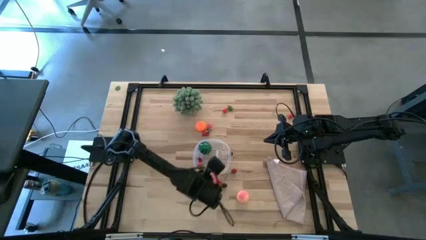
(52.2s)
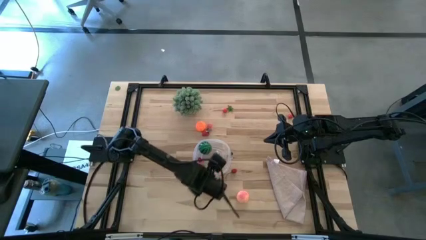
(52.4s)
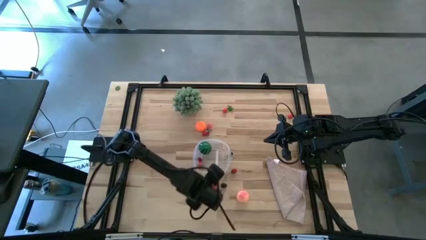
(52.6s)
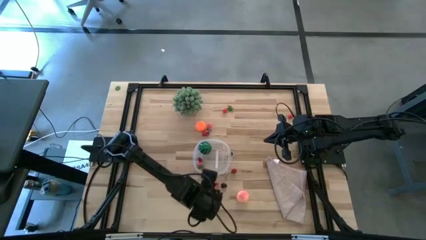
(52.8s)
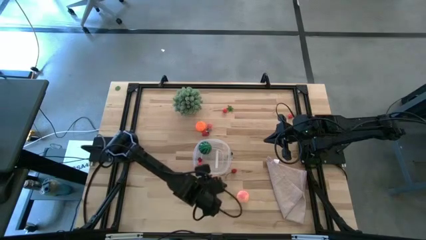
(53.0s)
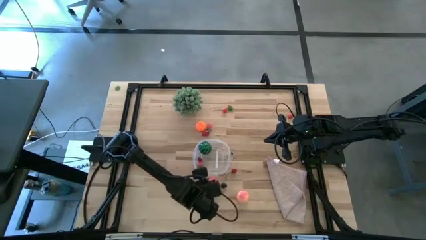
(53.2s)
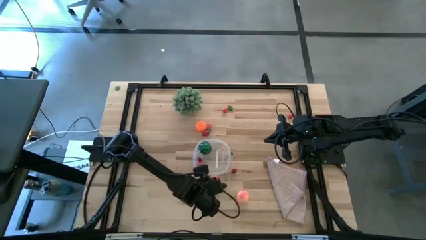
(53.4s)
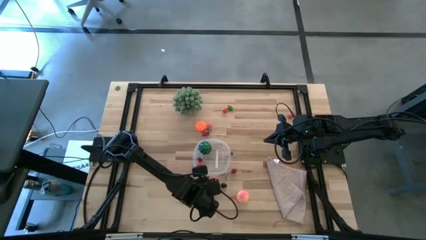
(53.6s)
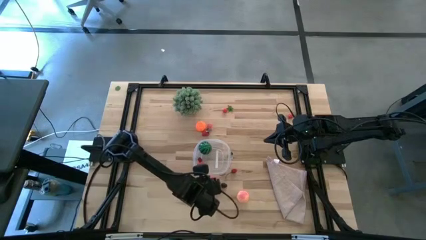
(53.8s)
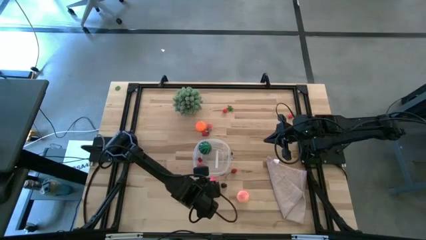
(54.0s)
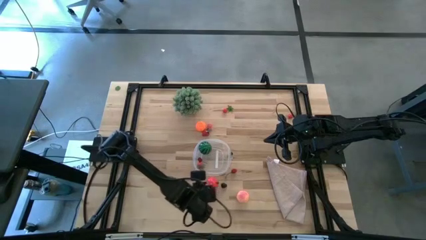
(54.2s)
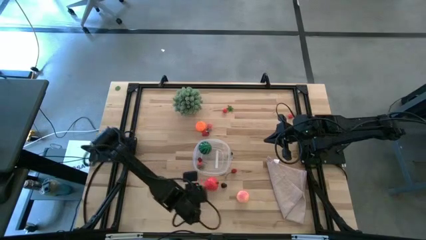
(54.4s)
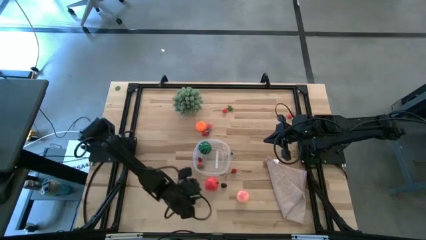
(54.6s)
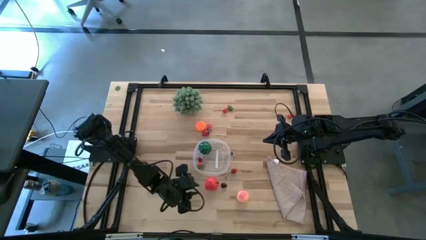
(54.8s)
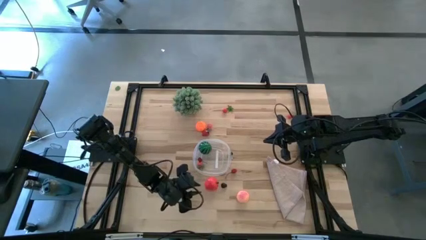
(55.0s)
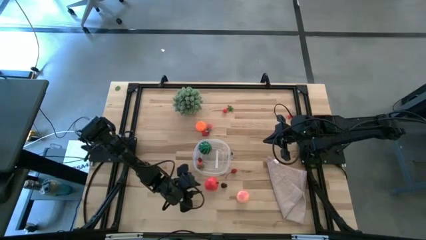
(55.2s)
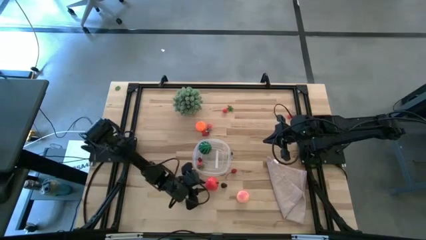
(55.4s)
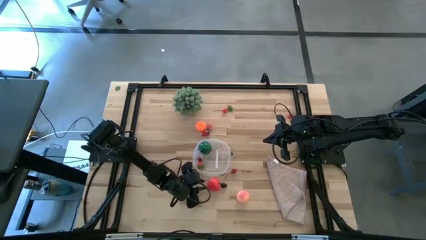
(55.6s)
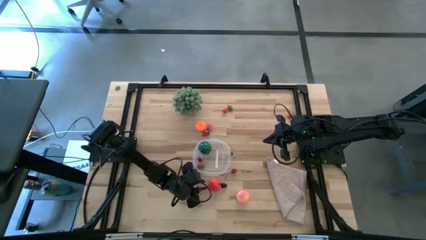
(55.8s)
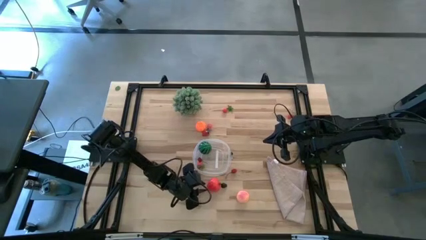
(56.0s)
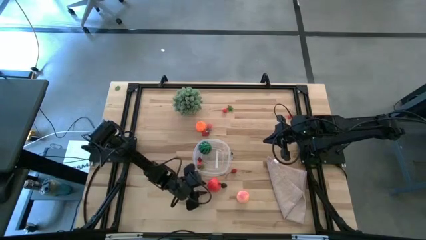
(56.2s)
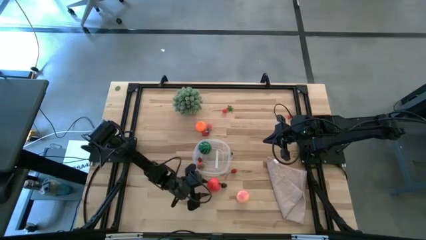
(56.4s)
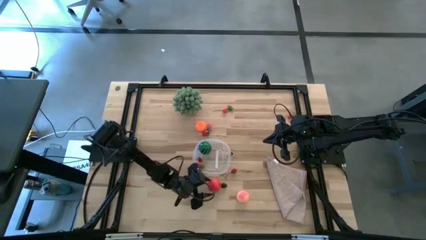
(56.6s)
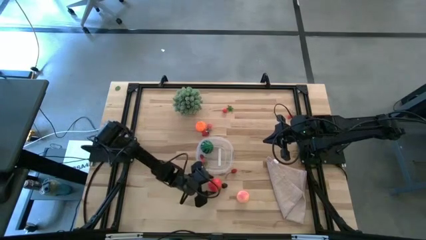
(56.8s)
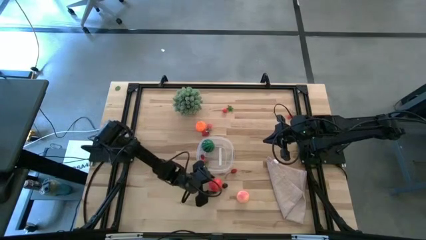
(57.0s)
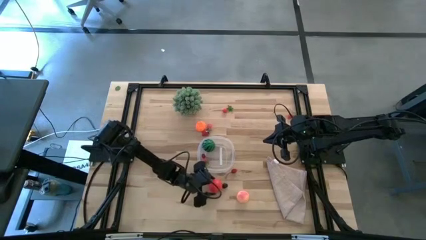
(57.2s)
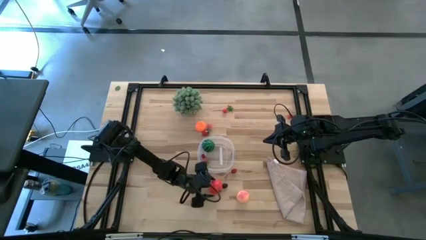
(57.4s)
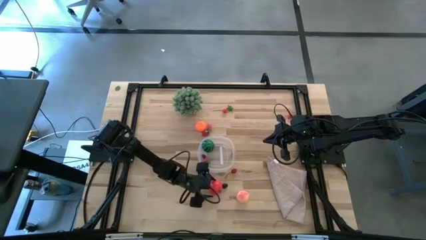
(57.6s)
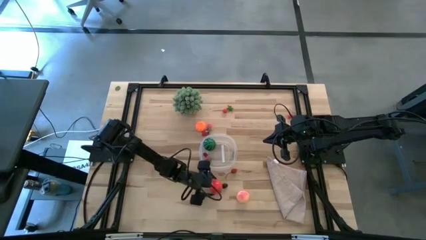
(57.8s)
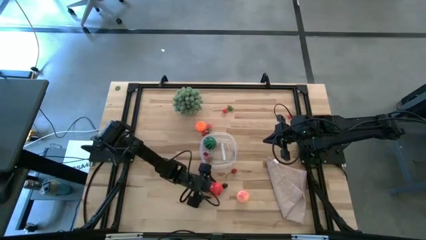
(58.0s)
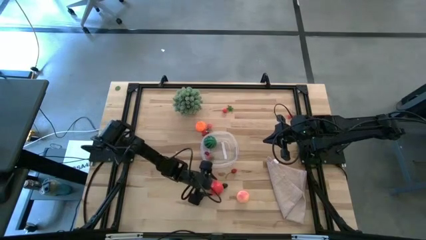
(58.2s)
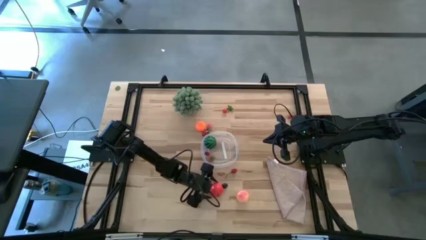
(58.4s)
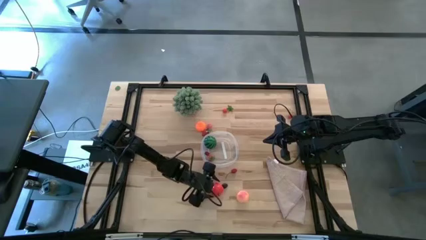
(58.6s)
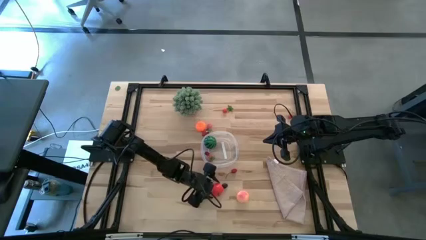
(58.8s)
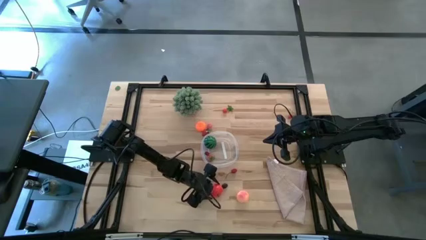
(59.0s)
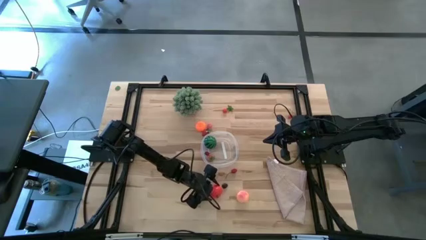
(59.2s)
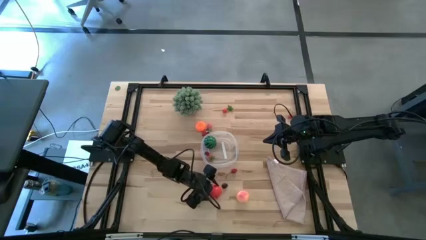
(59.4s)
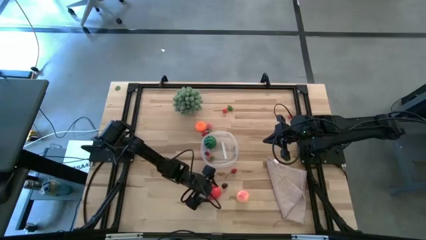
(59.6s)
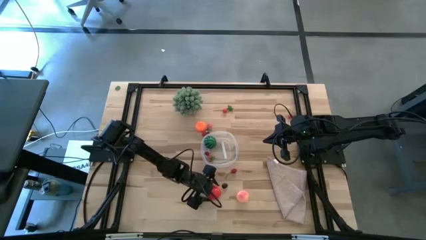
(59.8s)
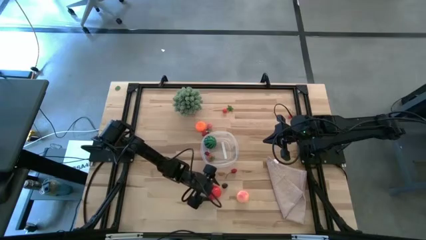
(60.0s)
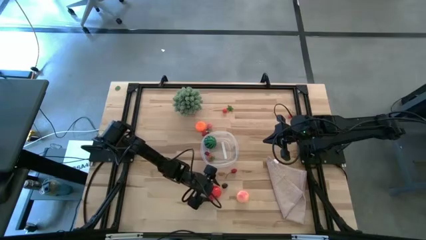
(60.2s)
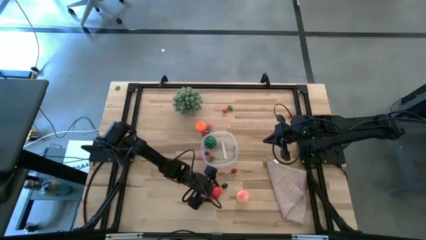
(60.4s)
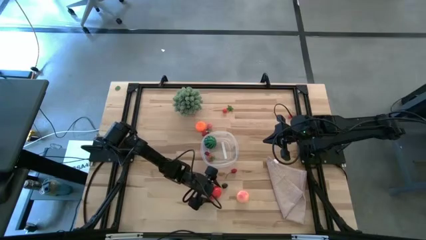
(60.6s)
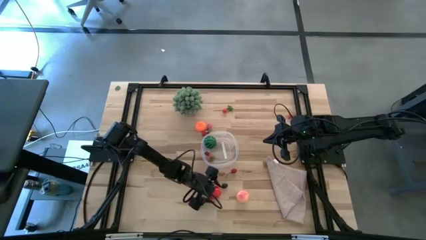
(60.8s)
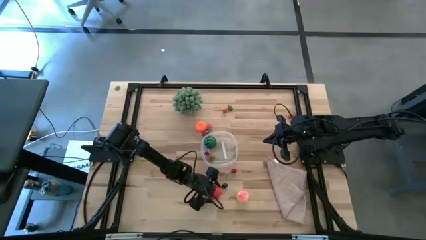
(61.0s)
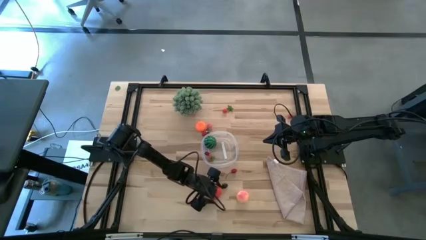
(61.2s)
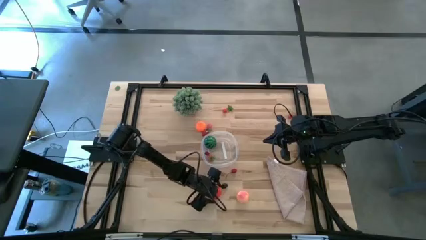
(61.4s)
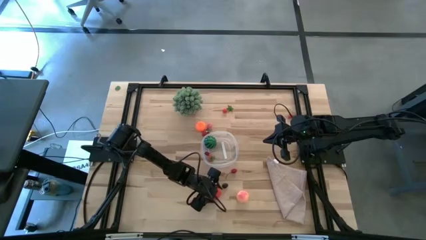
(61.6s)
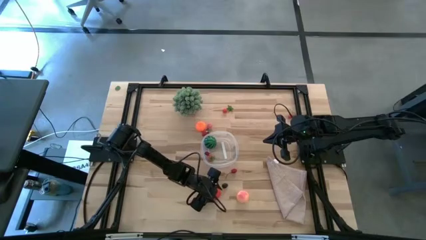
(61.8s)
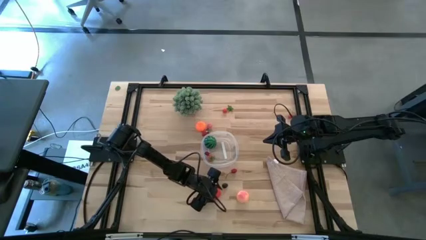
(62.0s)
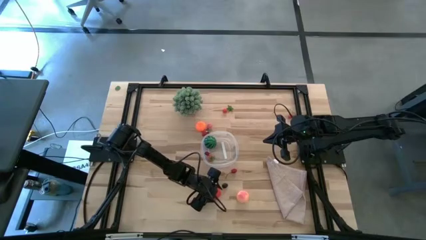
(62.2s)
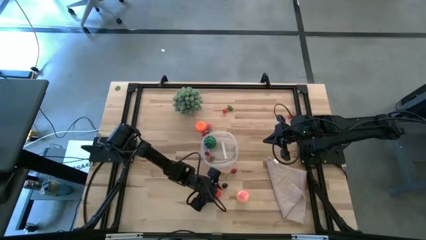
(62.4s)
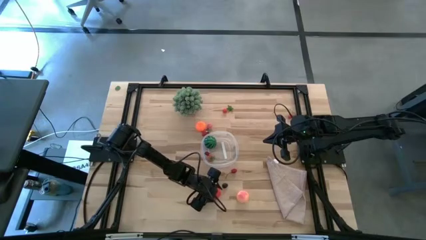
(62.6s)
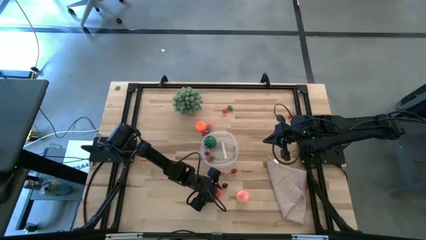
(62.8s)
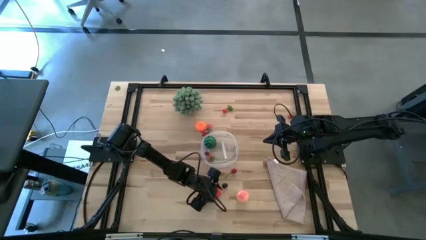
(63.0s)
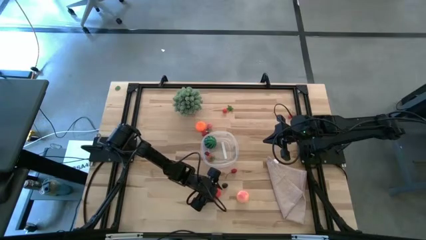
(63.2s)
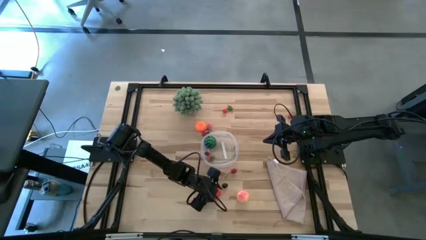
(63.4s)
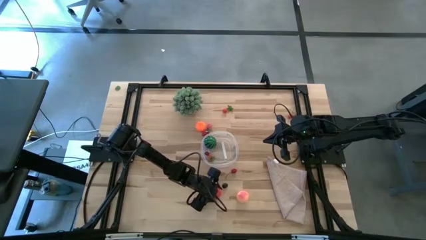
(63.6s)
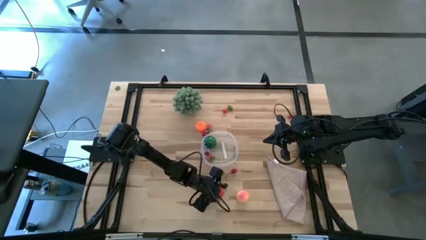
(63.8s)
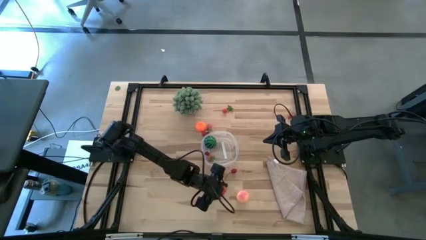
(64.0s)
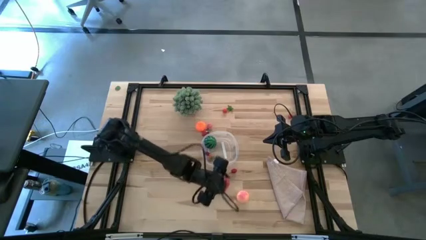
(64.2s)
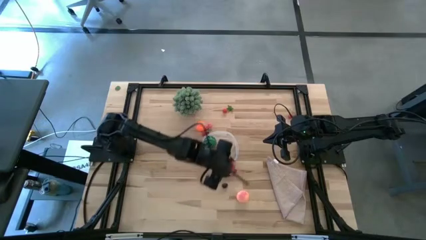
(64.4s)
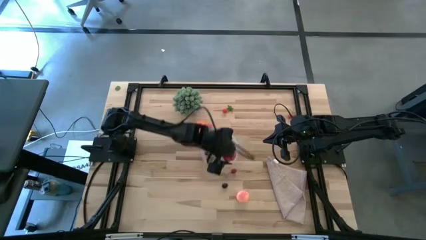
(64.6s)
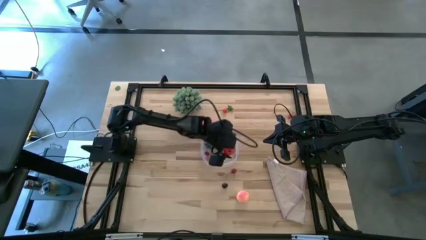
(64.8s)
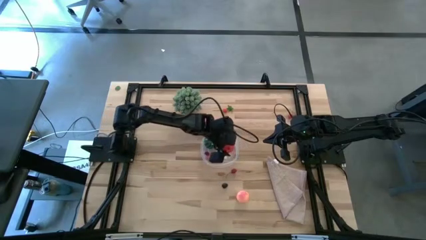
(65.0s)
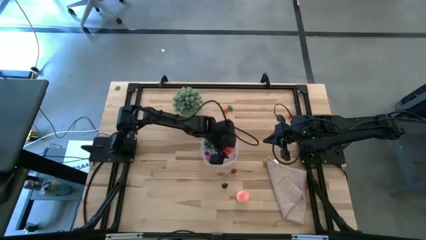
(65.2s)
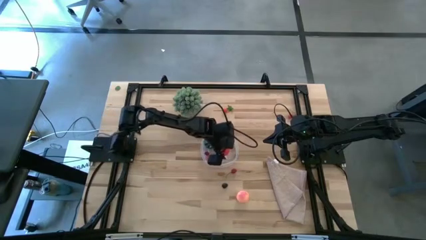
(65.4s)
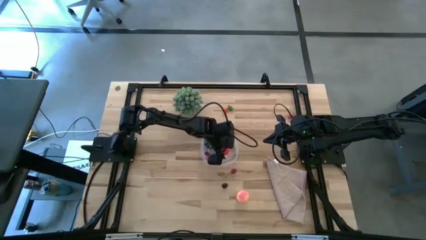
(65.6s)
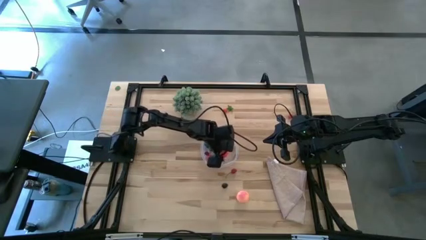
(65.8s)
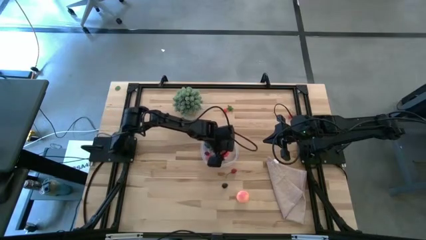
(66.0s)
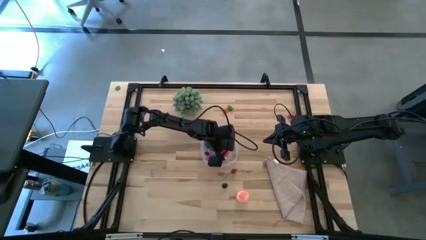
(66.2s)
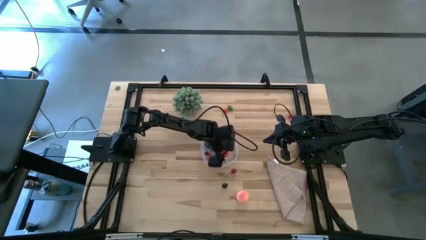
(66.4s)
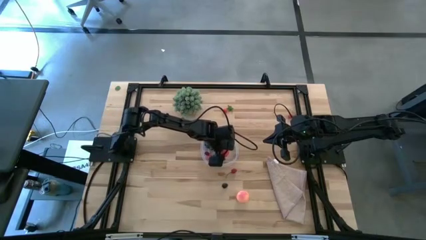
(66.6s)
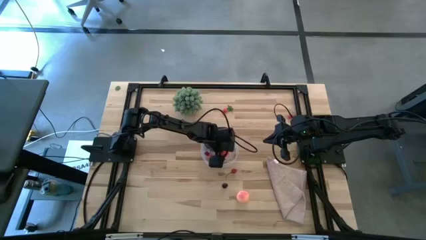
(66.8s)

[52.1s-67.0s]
Task: Pick and placing Produce into tupperware
Put the apple into the transparent container

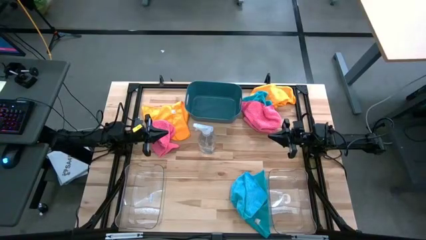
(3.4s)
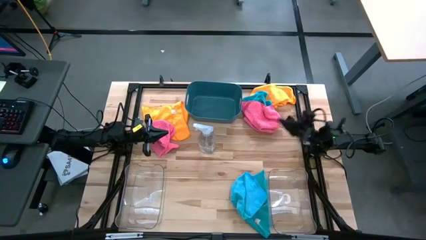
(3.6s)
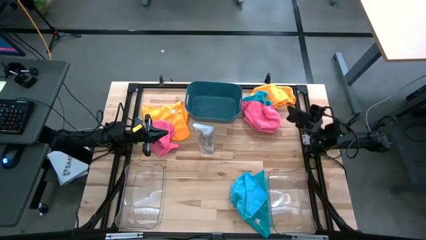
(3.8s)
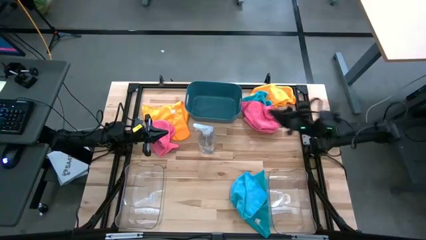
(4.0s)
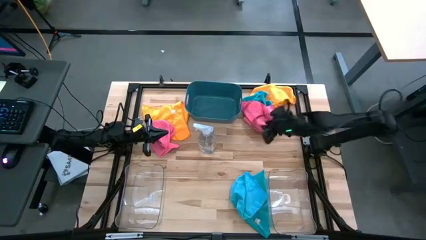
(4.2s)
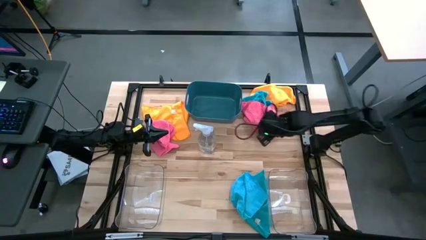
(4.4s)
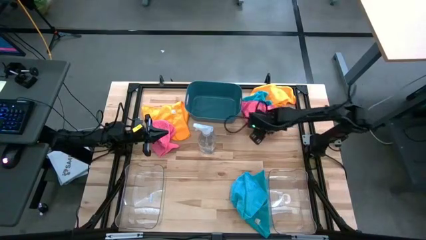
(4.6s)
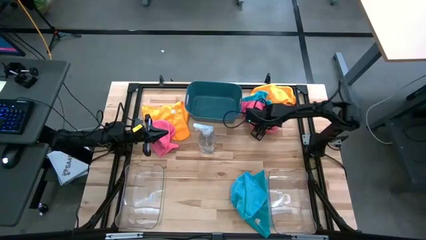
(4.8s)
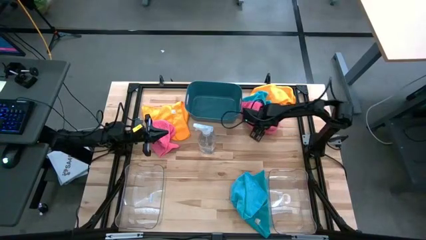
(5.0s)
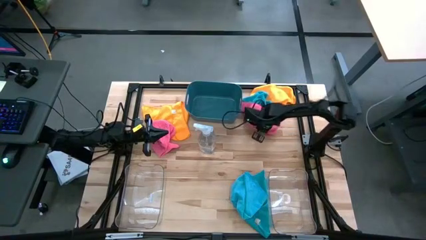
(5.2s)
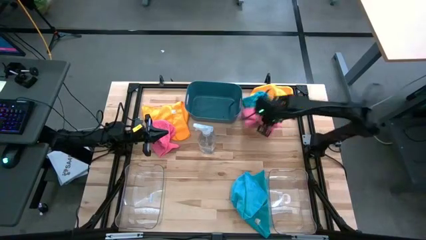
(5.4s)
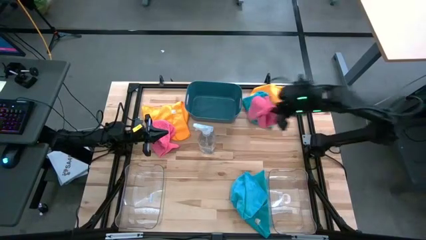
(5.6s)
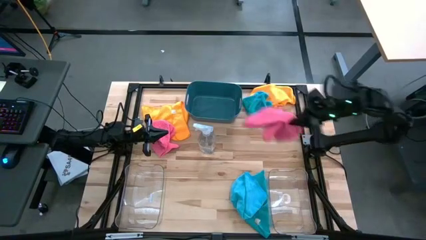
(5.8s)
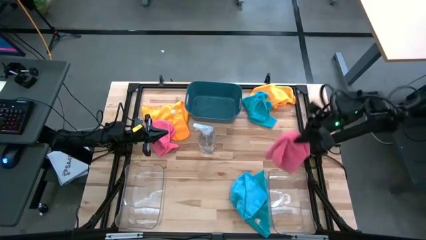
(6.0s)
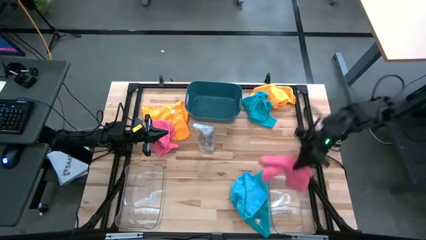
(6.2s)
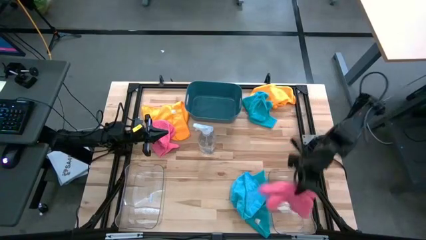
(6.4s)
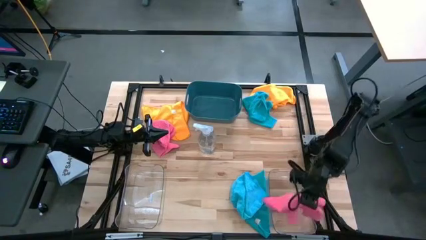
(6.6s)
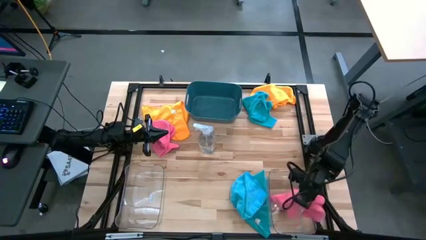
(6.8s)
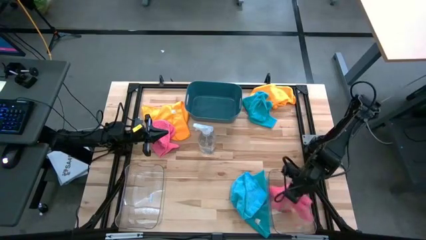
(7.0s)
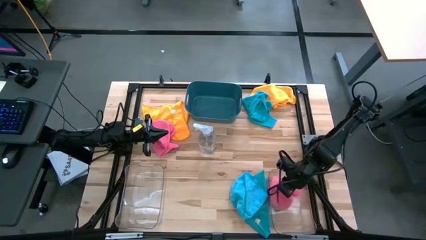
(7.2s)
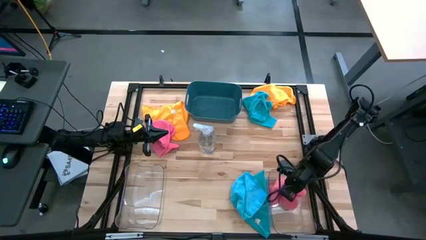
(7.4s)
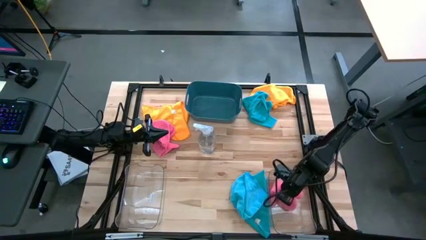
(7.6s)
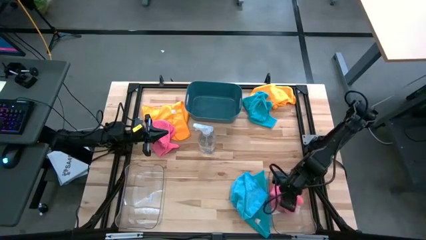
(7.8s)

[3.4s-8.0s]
Task: Sort microfiber towel by color & place in baskets
Put the right pink microfiber towel into the right transparent bin
